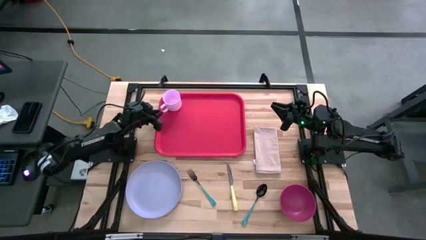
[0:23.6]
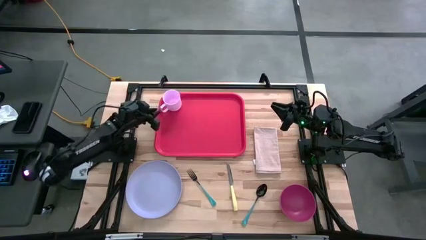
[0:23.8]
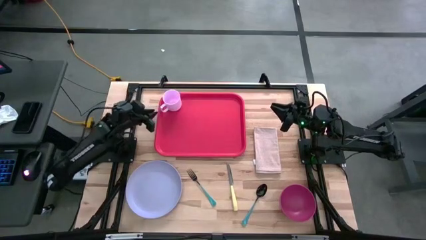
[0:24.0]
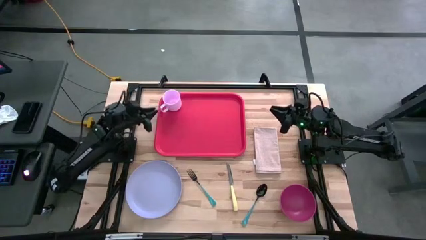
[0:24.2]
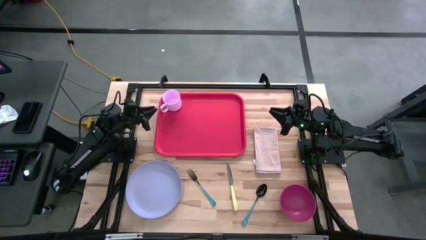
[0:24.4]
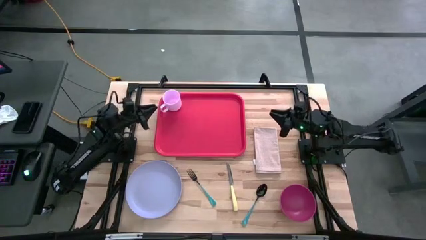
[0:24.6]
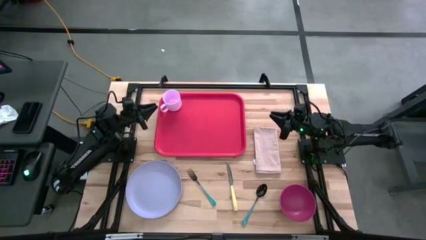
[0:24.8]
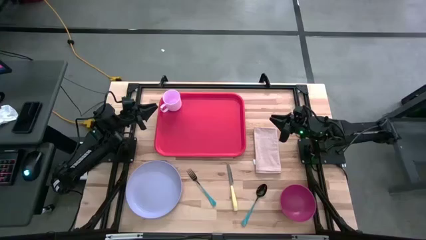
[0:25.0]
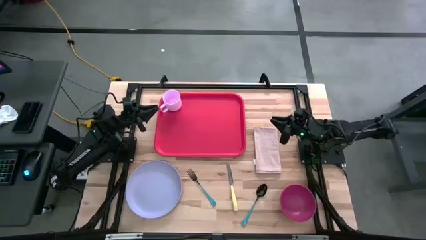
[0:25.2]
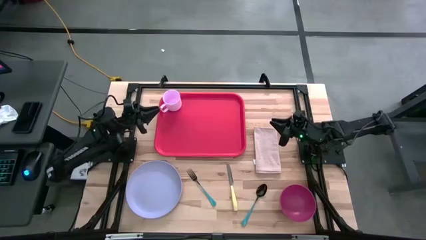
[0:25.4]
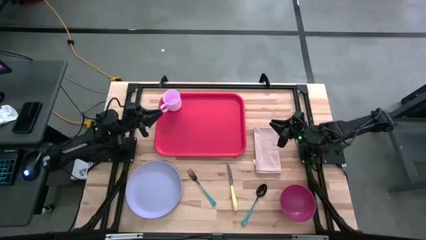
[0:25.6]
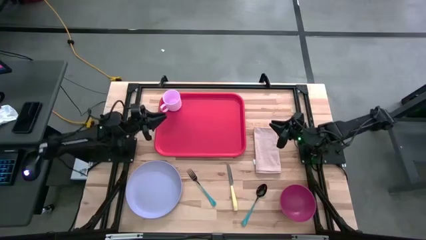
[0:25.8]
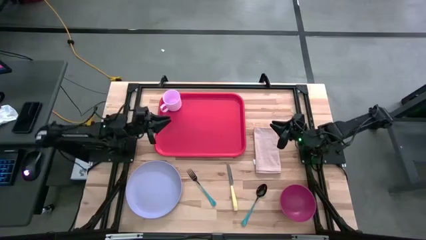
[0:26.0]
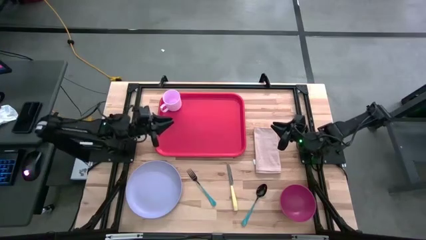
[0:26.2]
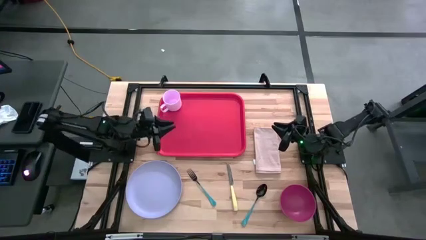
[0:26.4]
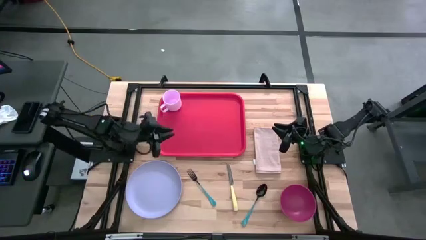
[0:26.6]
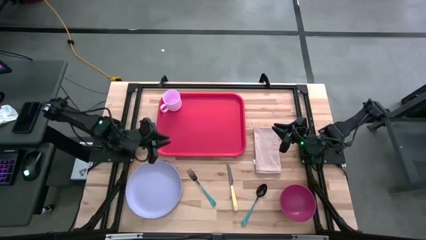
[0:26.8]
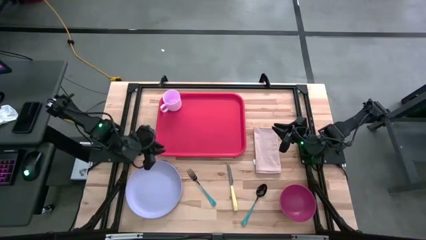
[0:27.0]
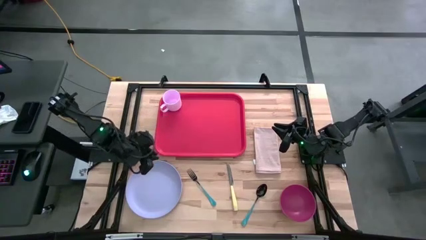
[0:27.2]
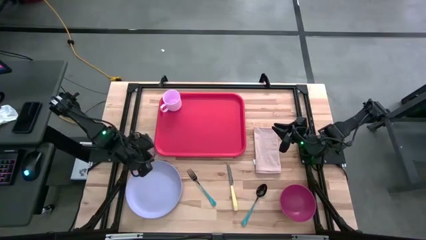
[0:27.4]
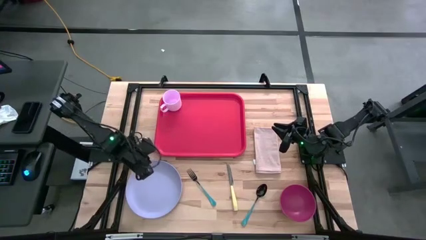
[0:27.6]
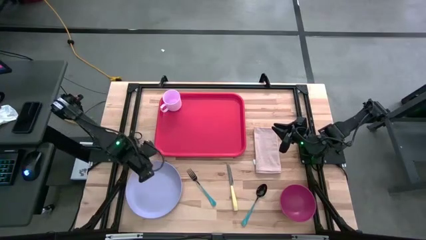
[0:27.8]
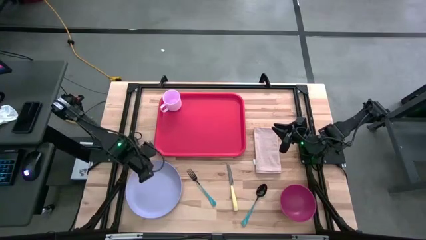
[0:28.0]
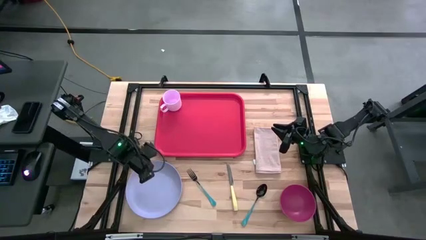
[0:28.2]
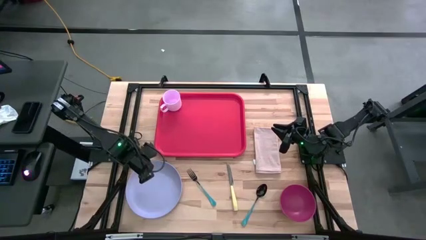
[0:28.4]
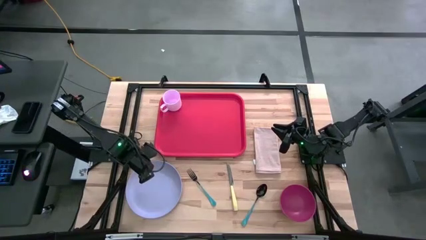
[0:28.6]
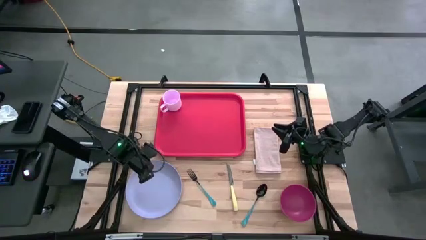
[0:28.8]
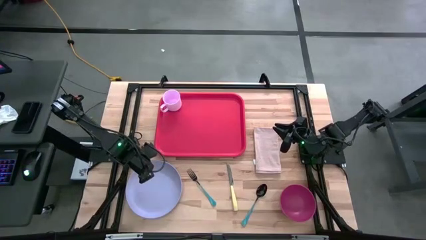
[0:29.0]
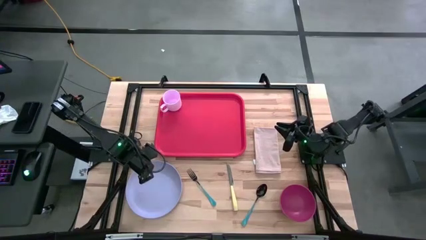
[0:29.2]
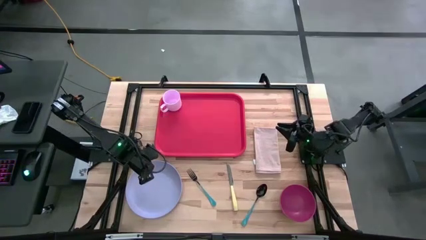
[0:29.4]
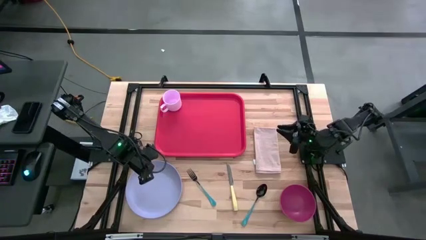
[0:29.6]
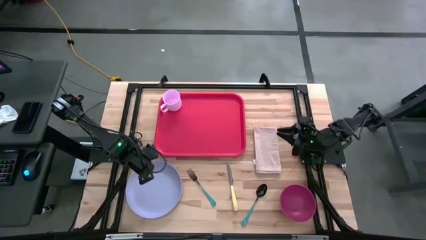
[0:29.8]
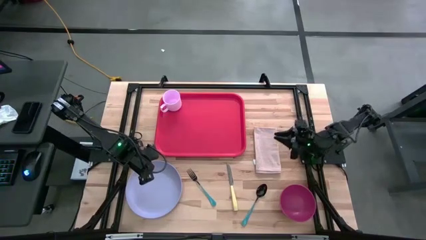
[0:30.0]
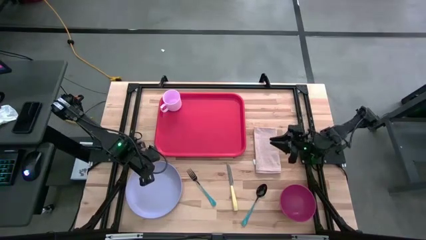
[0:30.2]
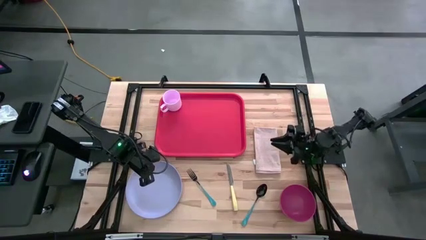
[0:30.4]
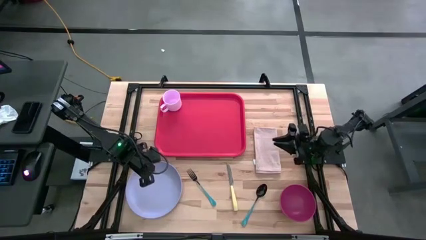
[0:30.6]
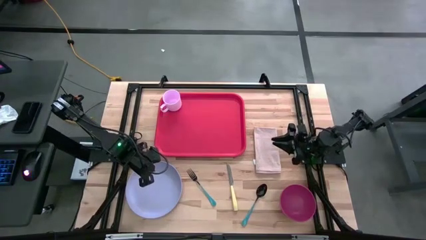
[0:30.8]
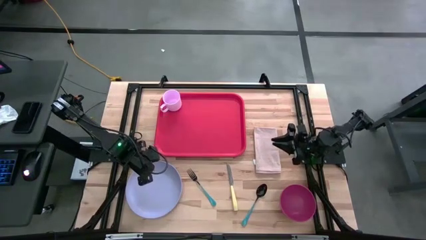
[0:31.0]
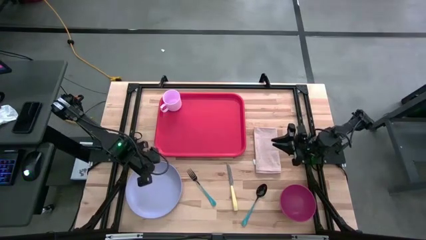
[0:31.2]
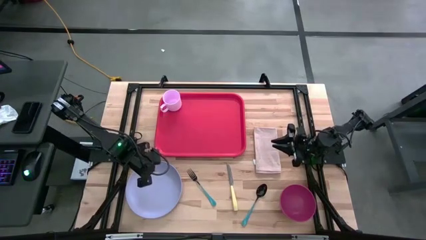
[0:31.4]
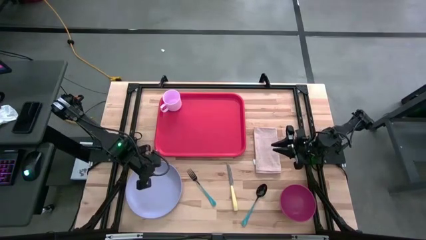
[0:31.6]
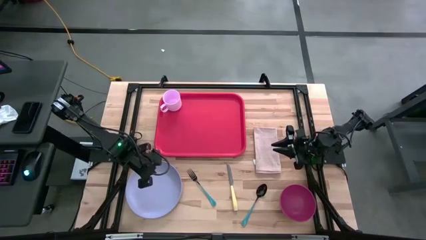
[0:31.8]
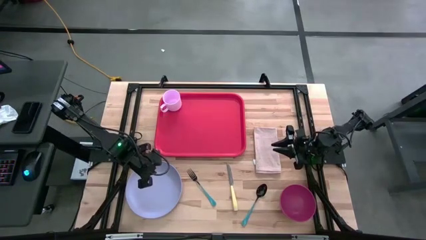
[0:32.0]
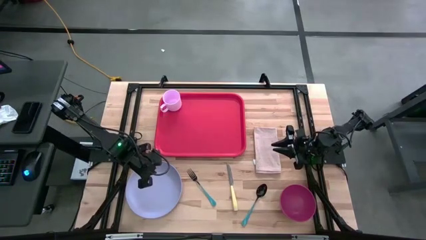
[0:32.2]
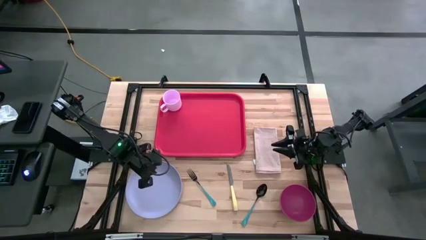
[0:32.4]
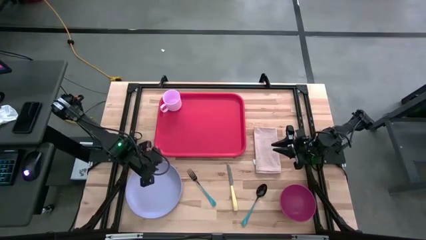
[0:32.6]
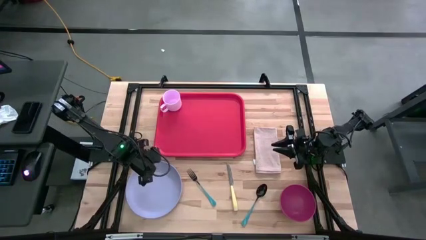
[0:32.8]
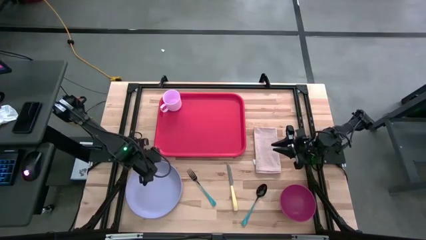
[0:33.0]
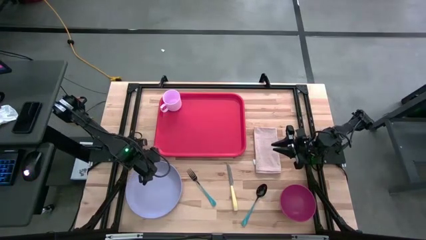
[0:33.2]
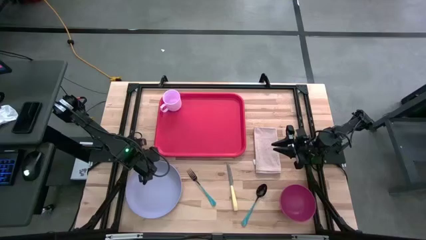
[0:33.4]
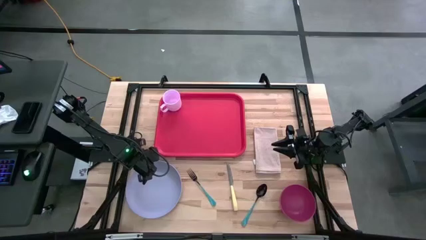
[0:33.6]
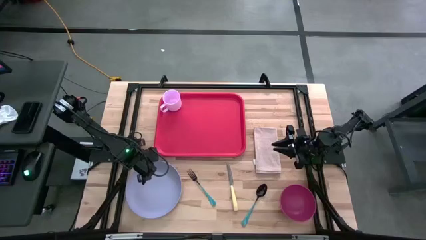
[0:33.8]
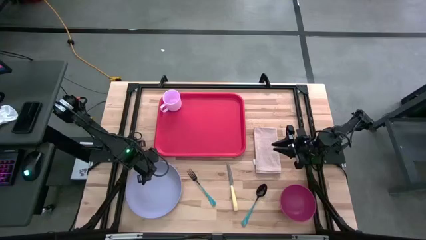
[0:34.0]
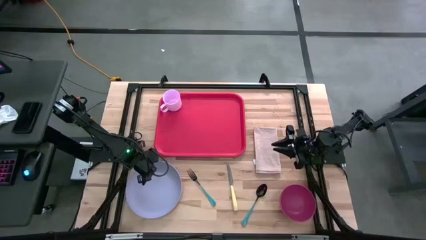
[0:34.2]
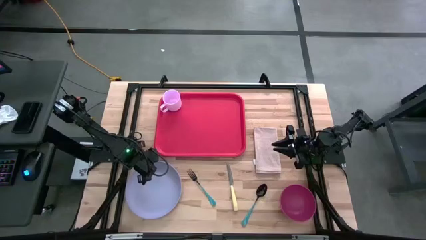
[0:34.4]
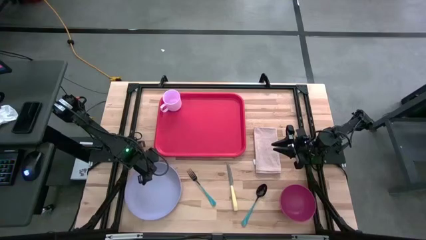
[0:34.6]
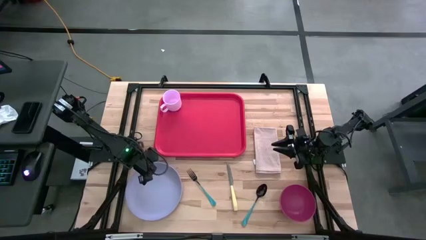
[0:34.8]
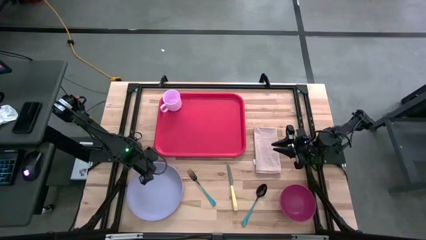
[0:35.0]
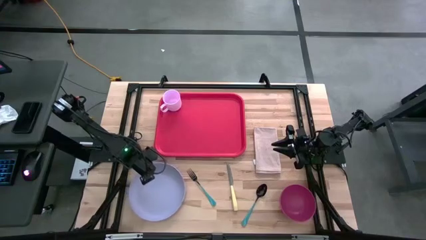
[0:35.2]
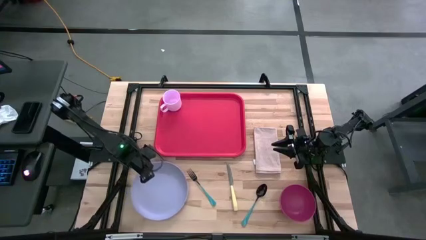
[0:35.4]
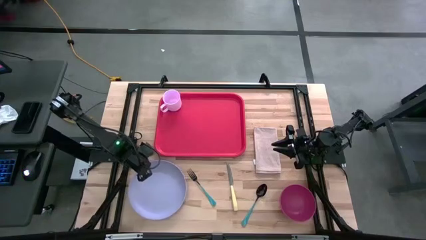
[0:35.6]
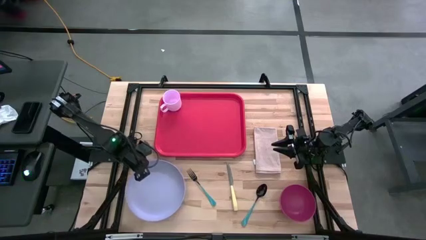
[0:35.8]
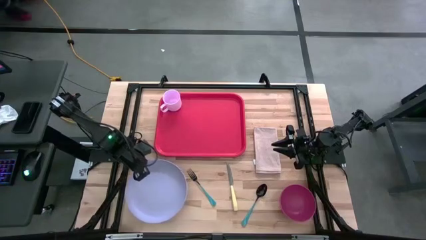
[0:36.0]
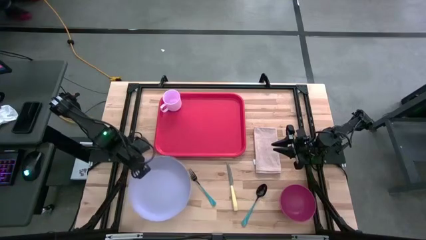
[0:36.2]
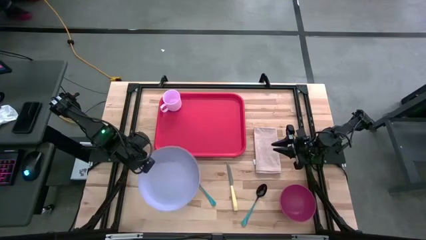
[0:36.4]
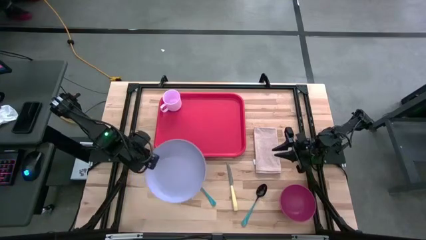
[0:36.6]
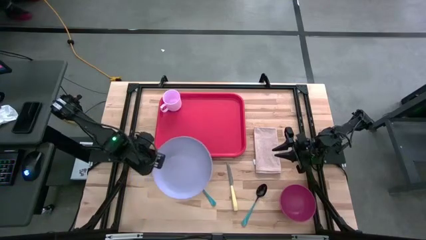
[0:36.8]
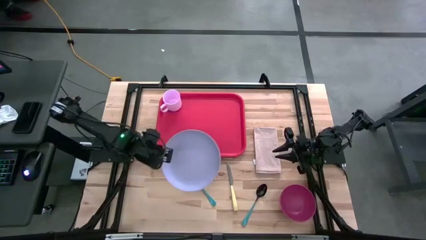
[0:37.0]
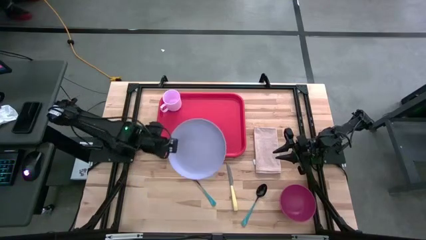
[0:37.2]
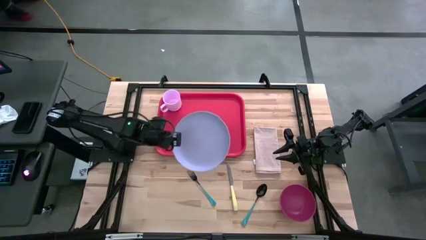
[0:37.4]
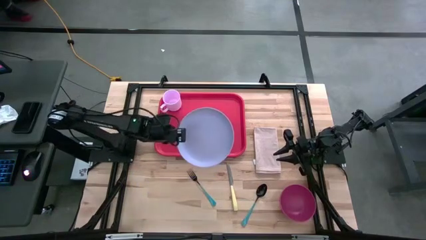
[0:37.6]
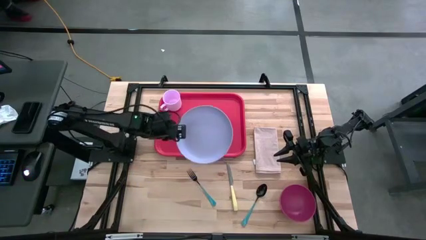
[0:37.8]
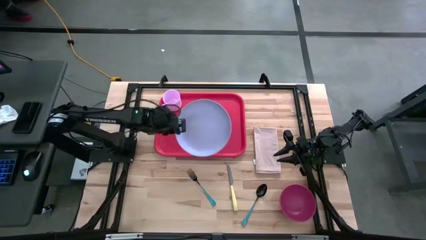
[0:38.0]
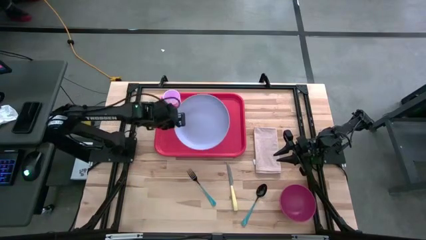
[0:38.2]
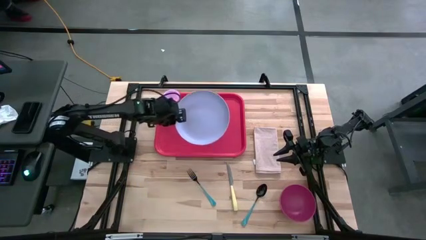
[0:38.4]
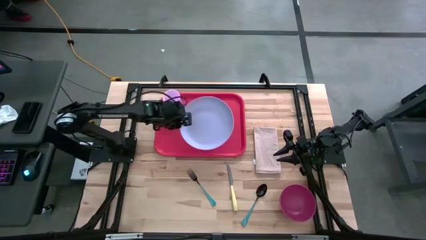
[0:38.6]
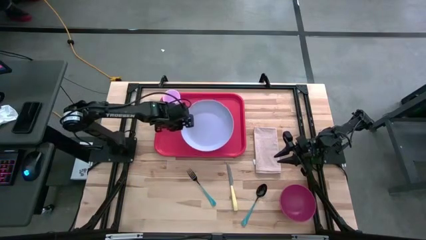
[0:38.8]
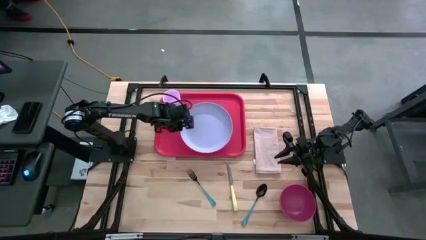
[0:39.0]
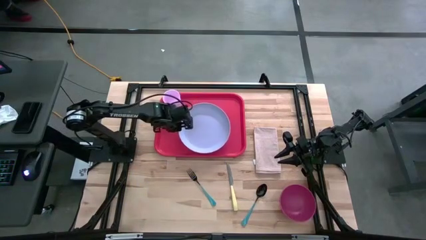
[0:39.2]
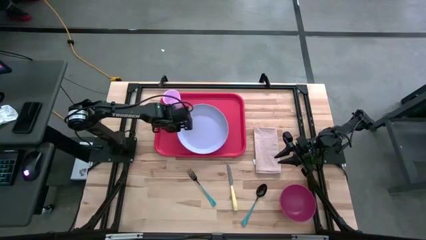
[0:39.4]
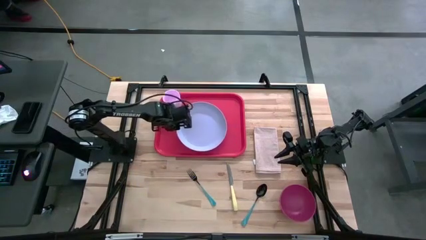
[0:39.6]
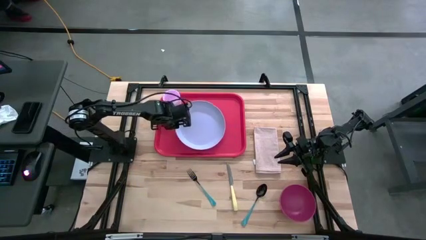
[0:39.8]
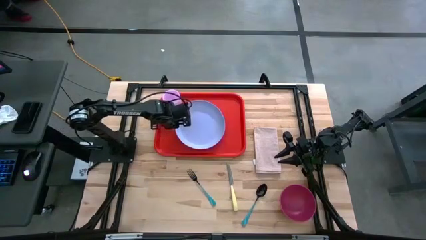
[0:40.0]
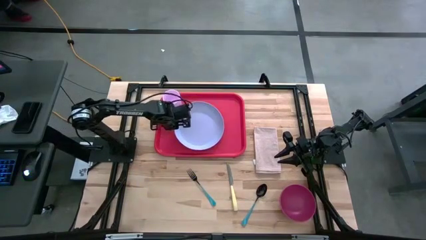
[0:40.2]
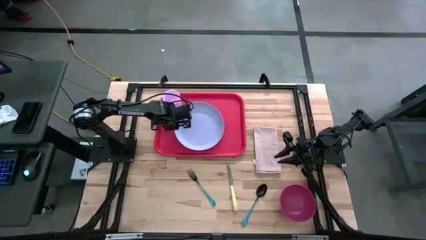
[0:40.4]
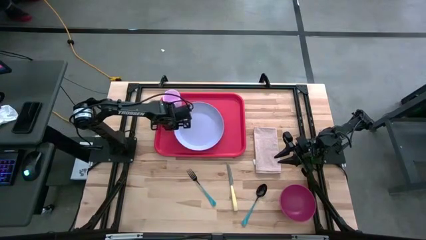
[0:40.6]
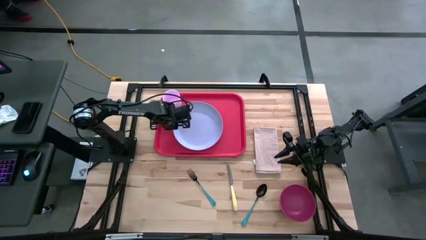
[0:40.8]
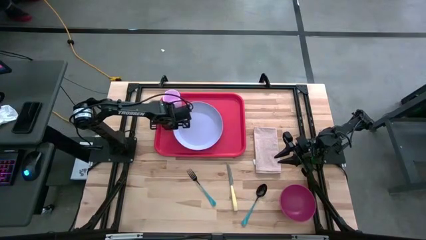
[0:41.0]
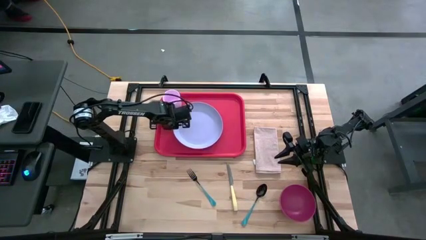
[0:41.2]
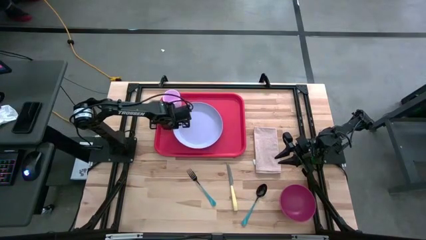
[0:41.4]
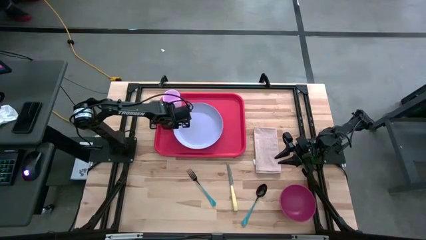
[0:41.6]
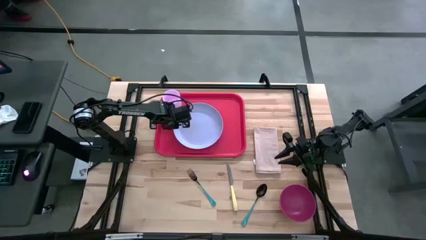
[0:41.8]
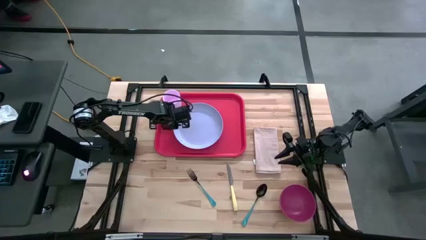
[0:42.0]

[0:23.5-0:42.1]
Task: Set up tray
Put the purple plate on the red serving tray to the bottom right of the pink mug
